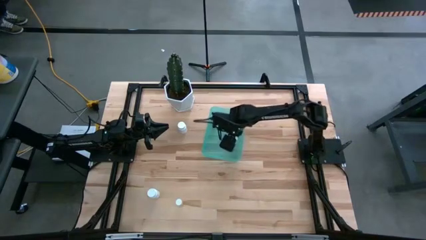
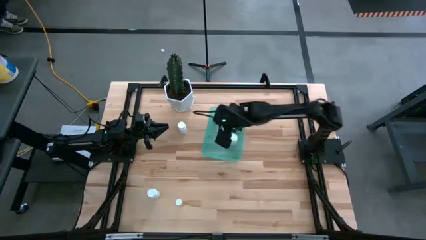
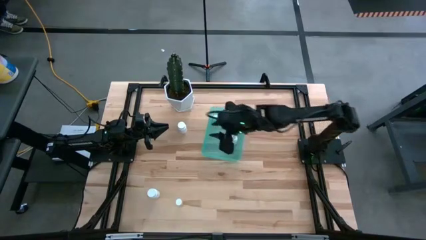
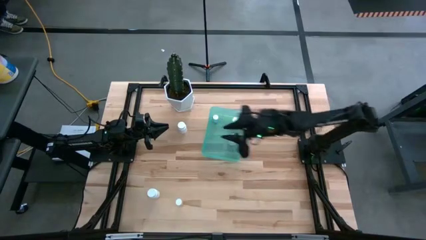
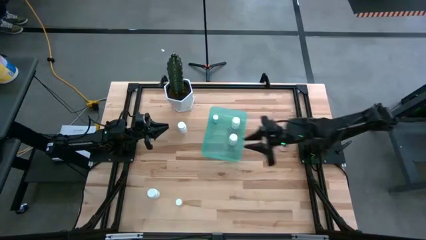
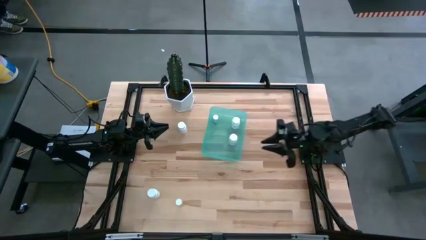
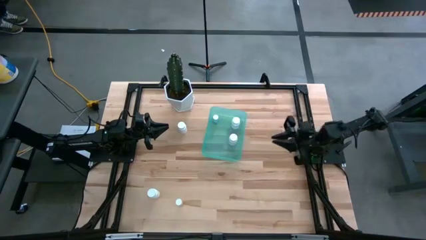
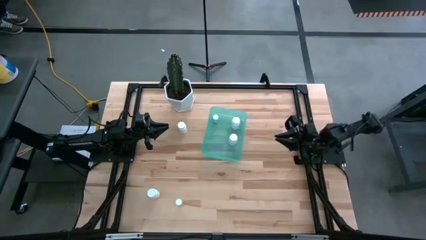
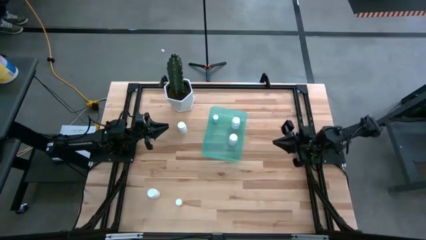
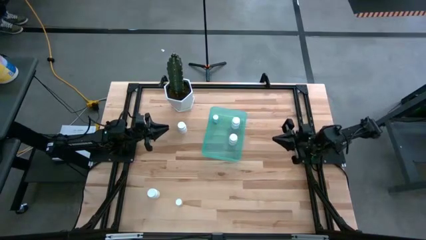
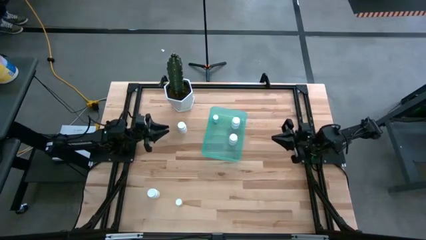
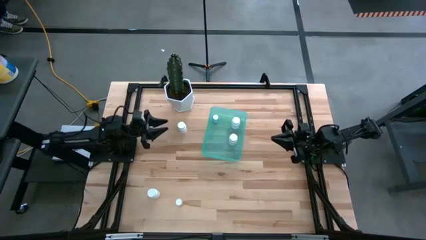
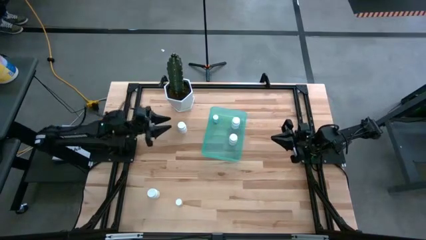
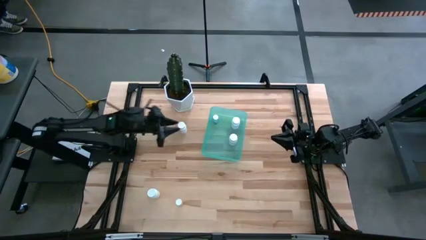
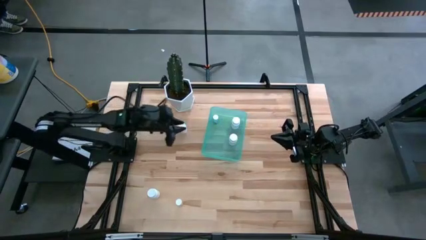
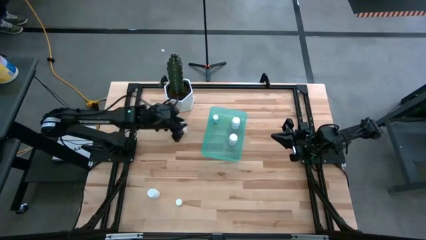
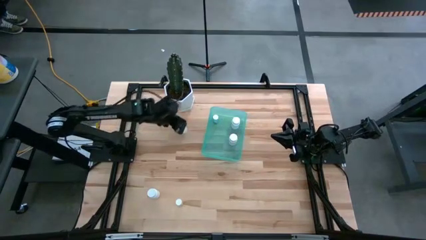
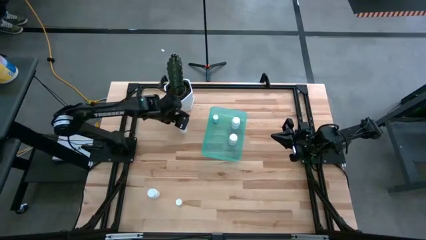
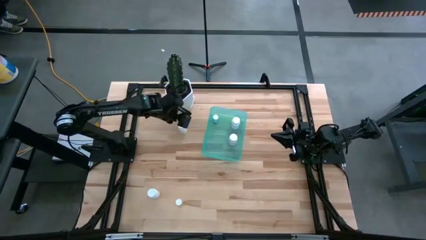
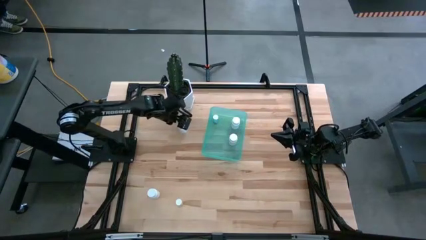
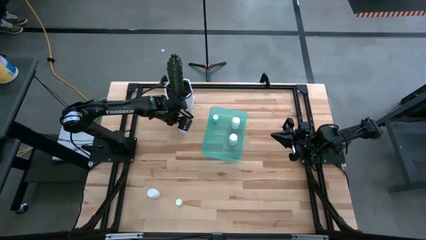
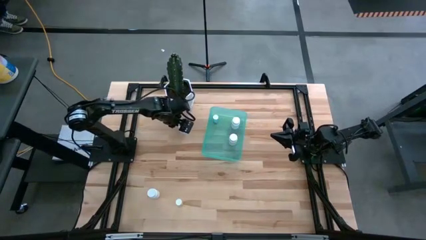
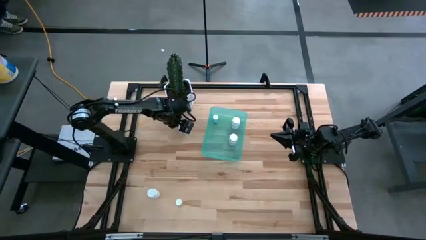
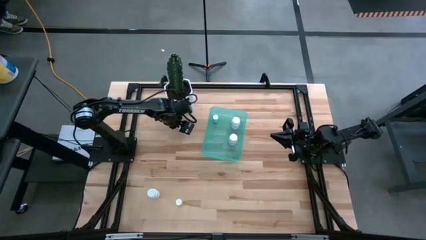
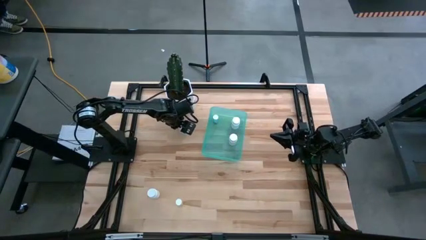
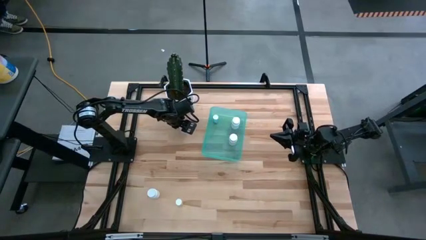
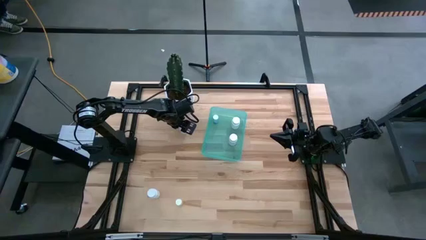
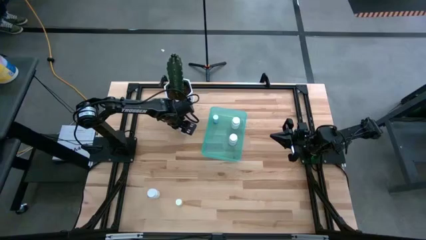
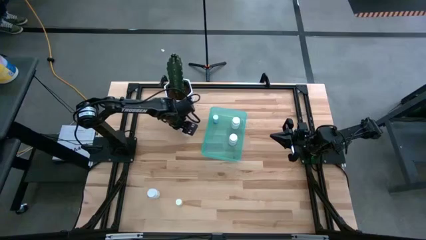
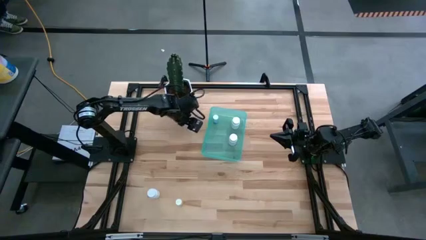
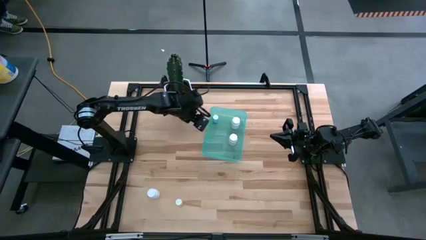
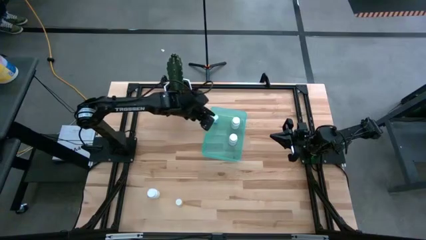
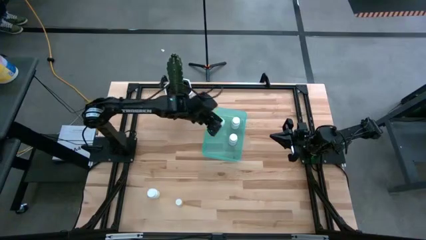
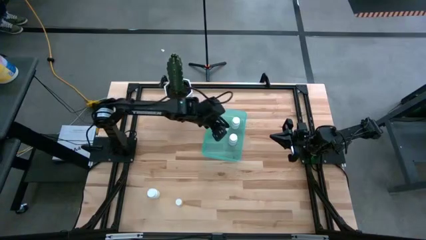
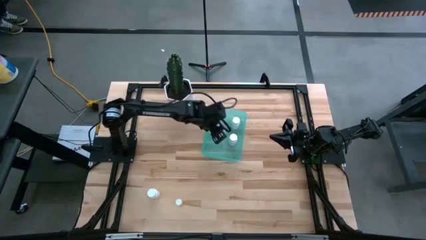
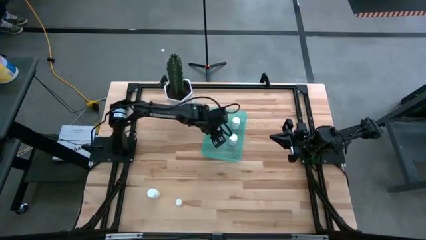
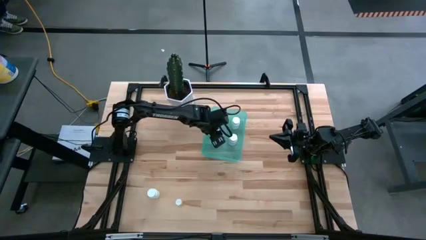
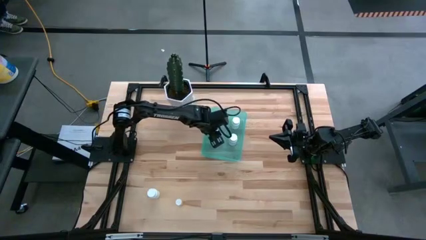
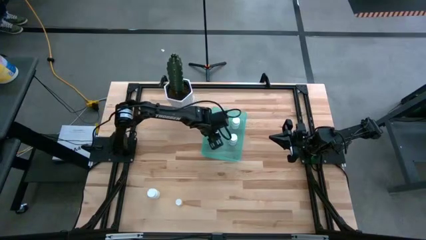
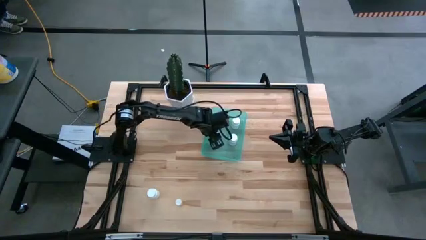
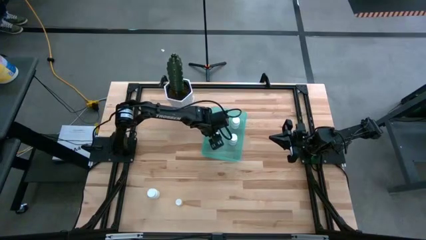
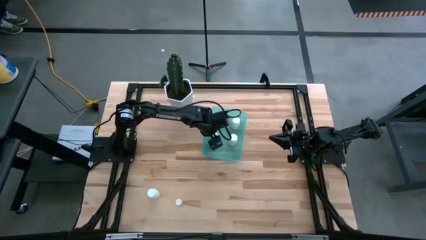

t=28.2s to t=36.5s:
Task: Pick and place pill bottles into a basket
Put the top white pill bottle into the blue bin

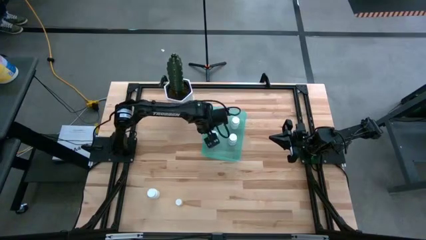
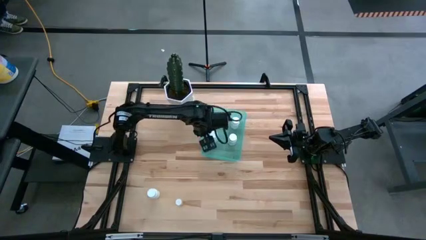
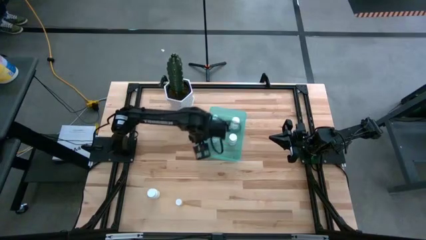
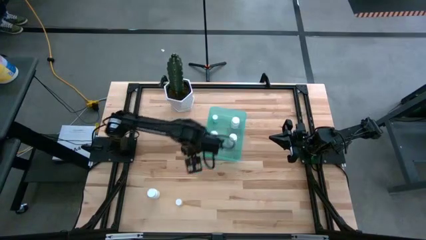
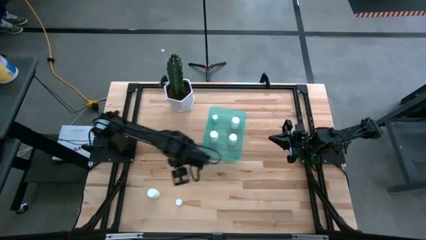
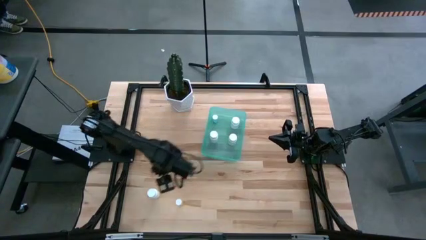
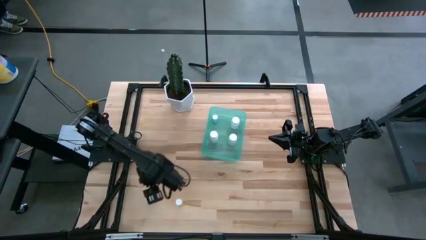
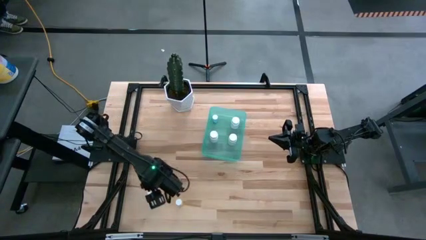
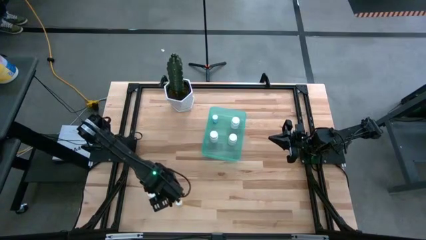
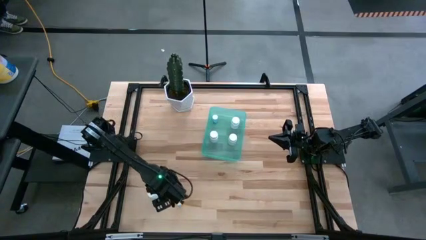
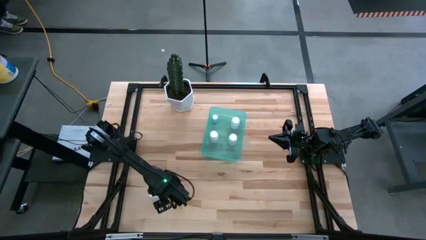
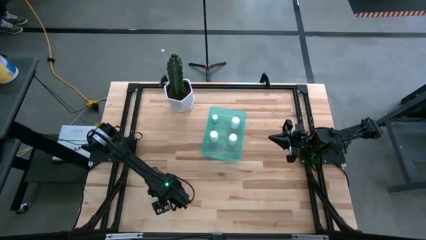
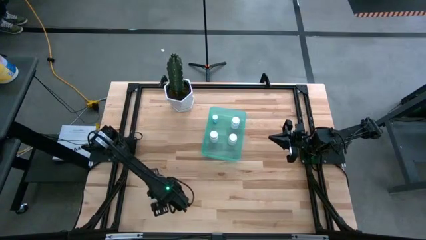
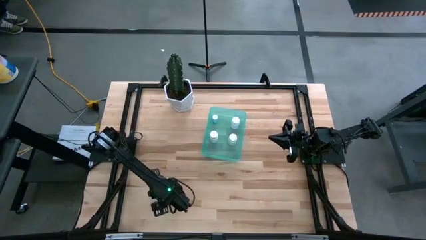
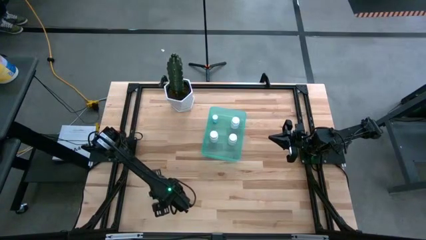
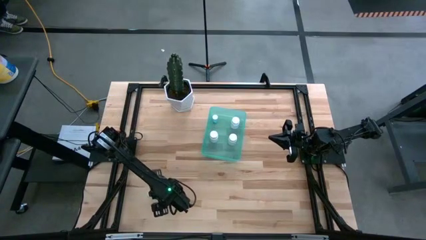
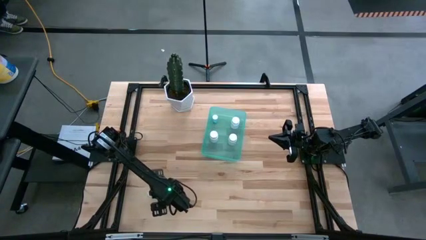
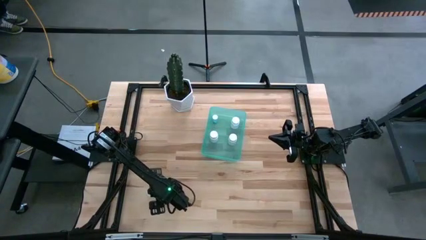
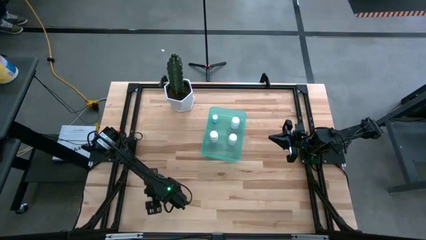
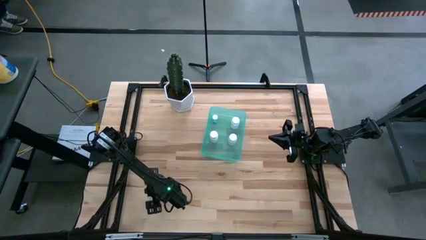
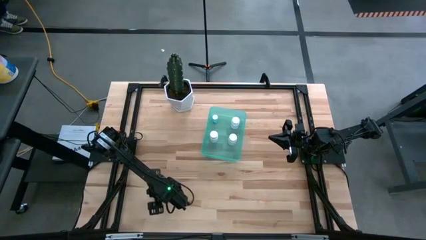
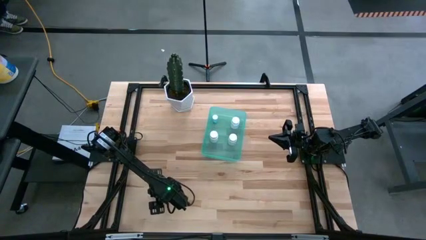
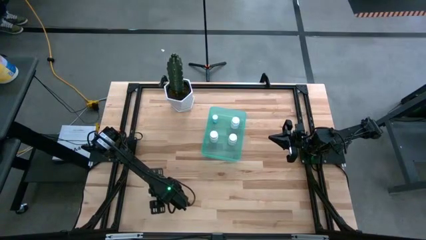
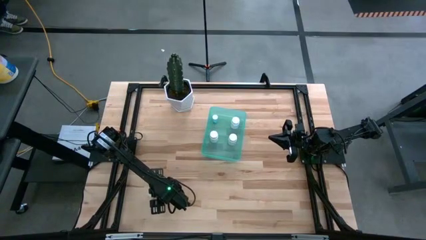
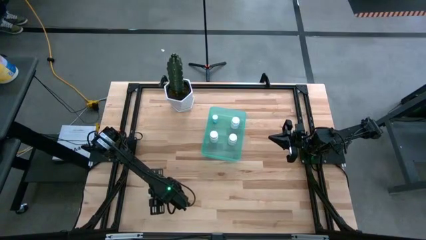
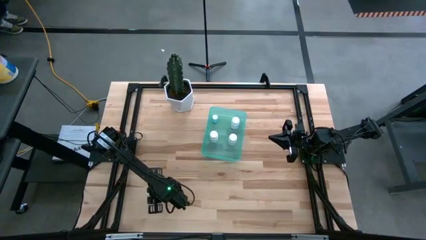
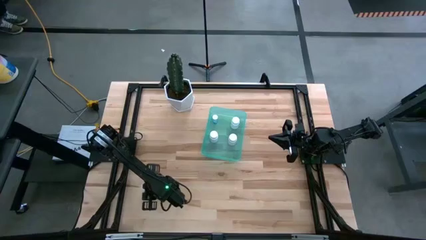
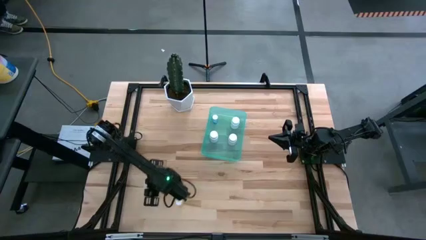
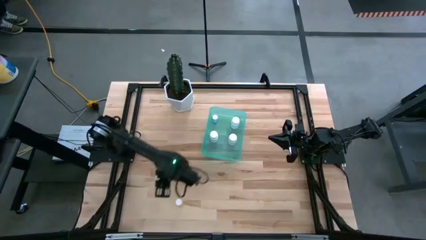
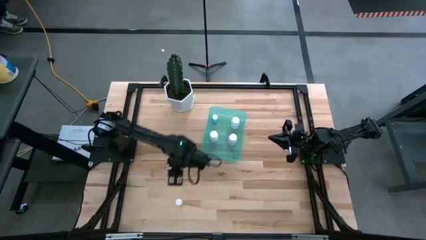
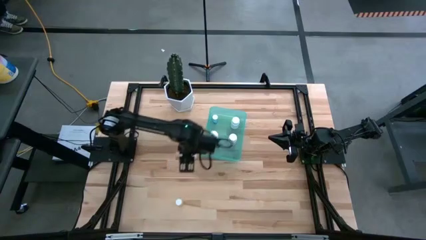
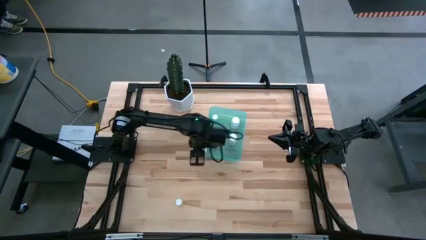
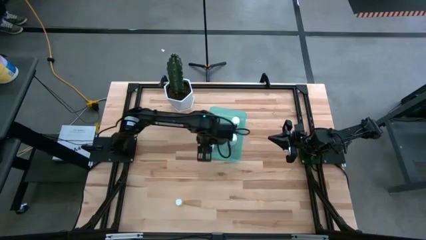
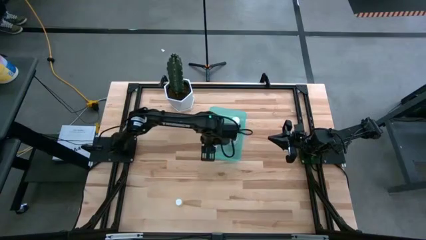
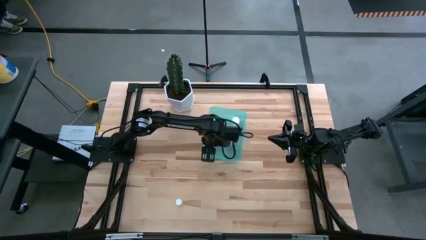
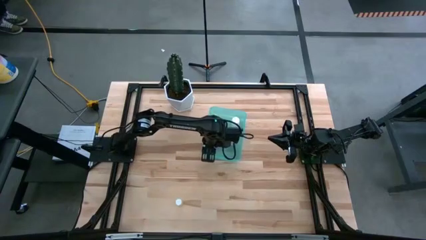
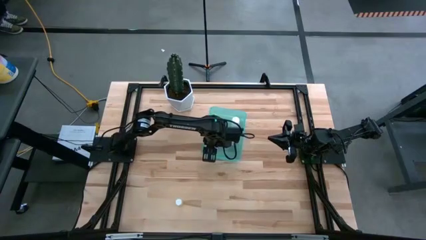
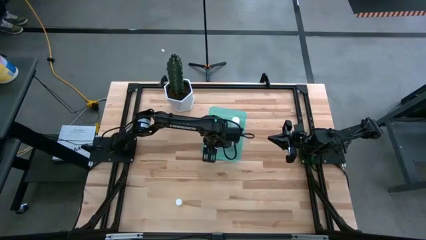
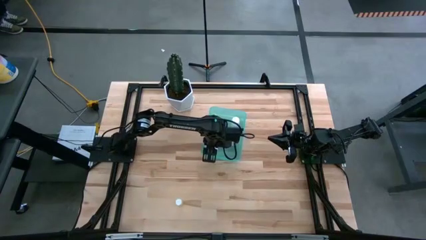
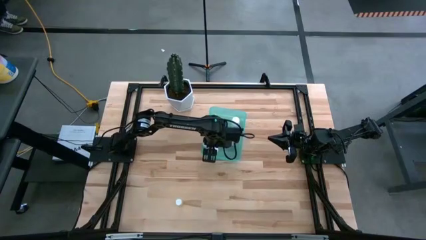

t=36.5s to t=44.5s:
Put the white pill bottle into the blue bin
